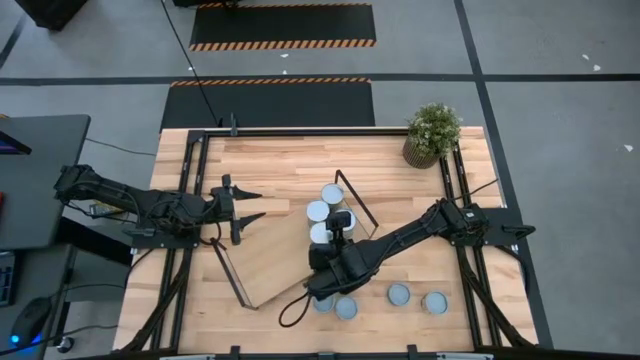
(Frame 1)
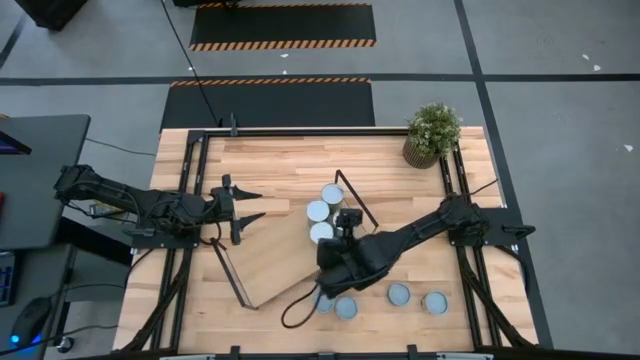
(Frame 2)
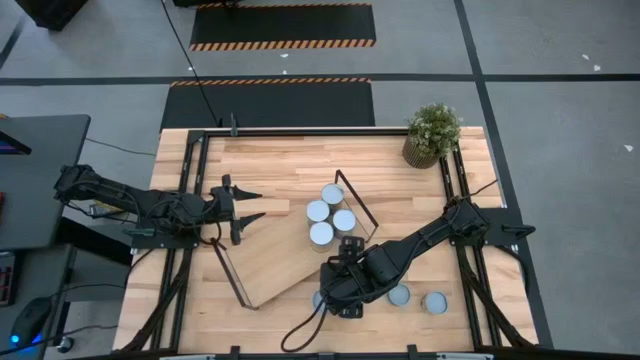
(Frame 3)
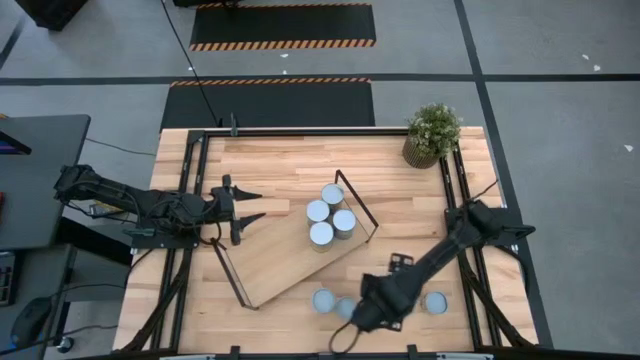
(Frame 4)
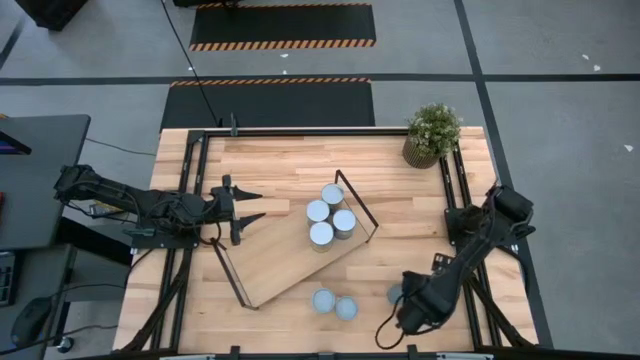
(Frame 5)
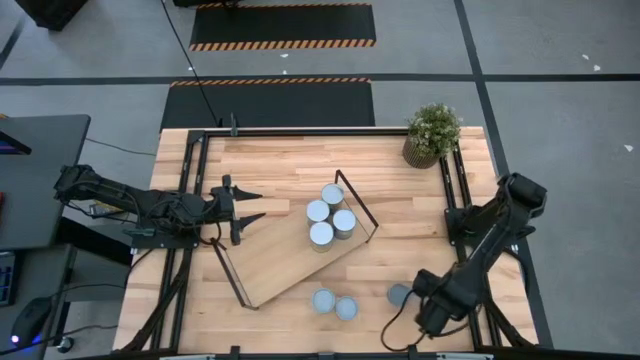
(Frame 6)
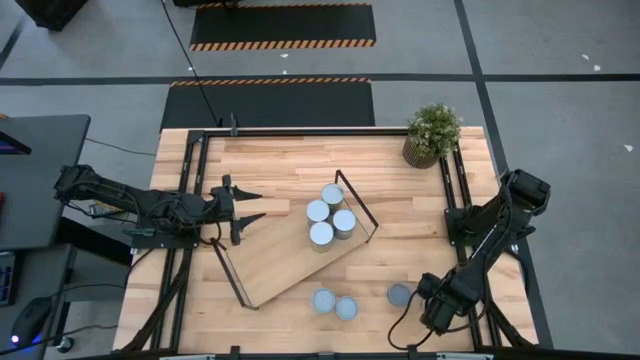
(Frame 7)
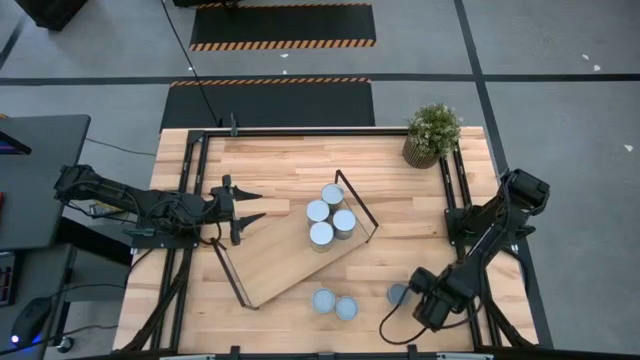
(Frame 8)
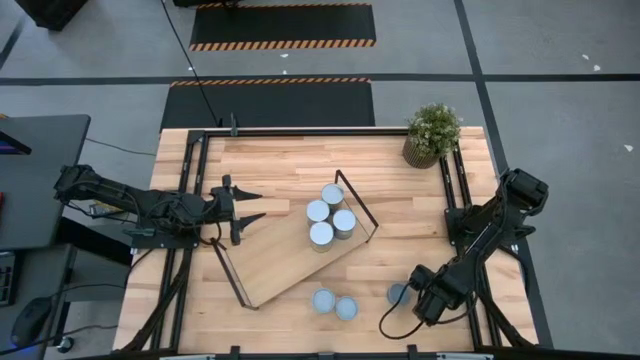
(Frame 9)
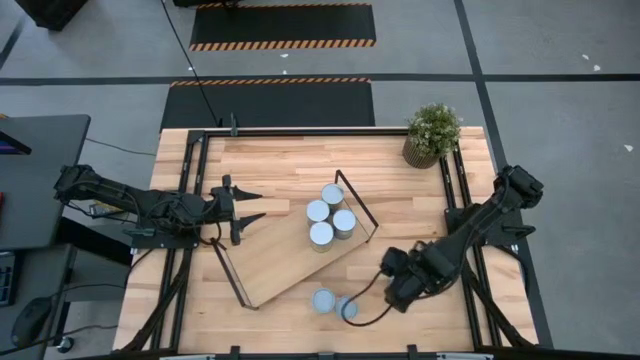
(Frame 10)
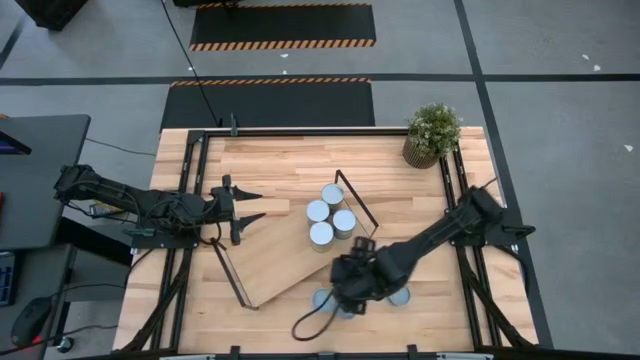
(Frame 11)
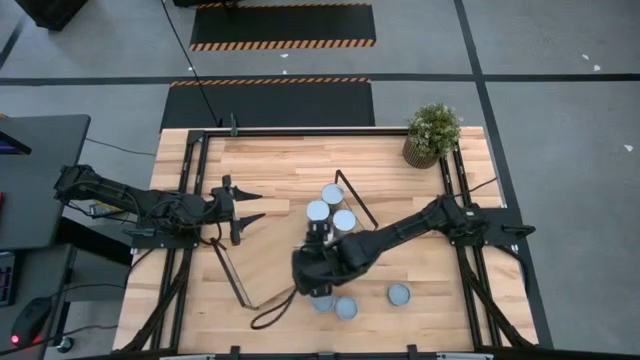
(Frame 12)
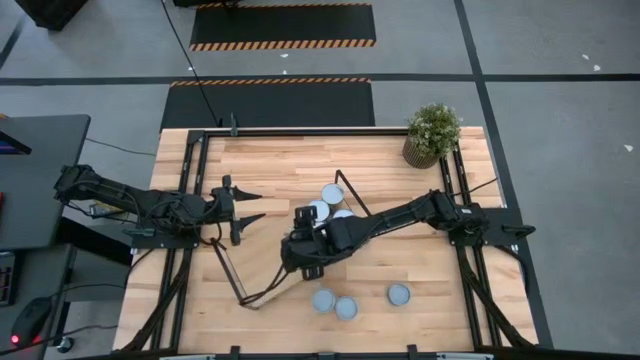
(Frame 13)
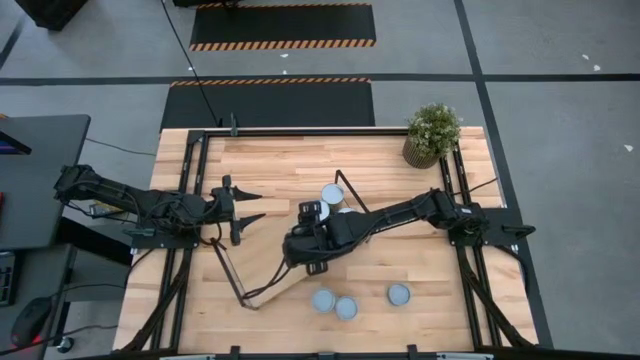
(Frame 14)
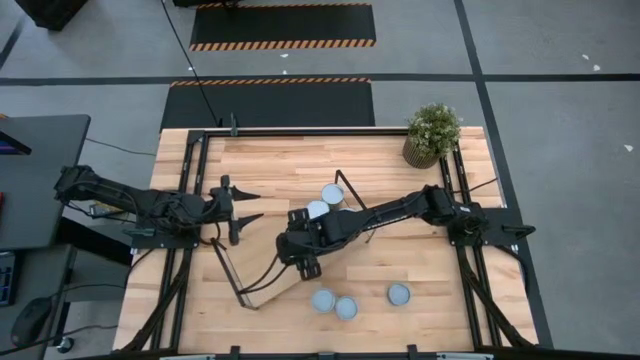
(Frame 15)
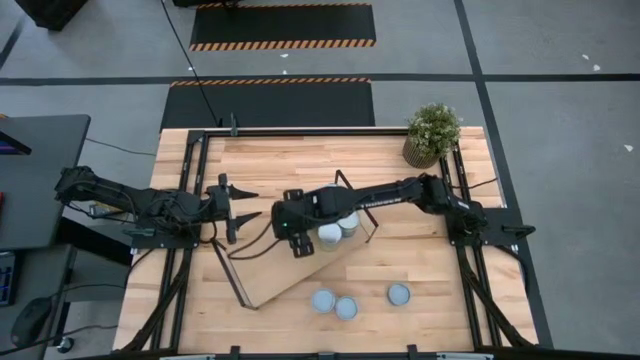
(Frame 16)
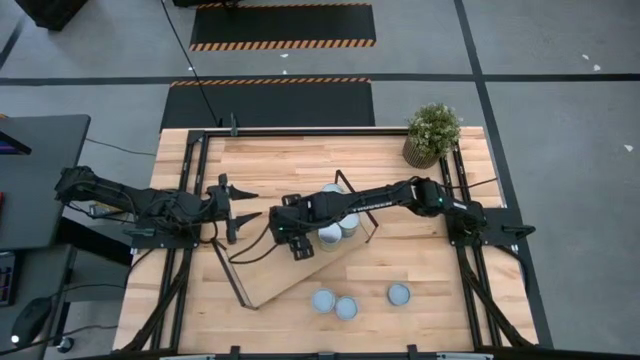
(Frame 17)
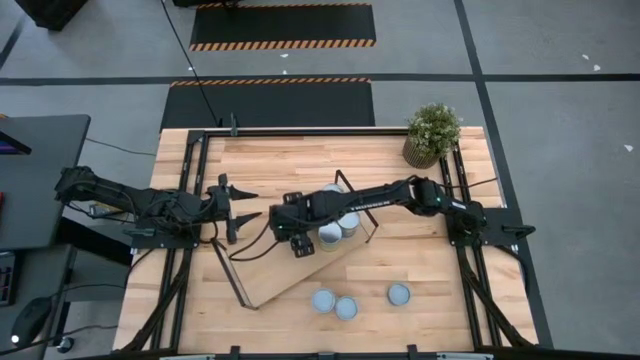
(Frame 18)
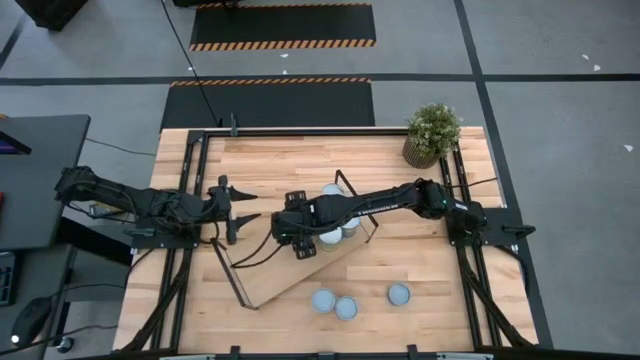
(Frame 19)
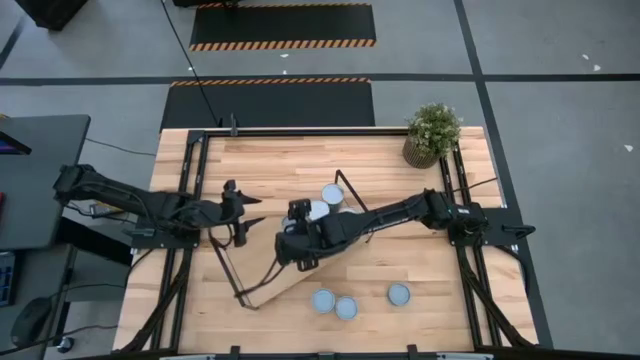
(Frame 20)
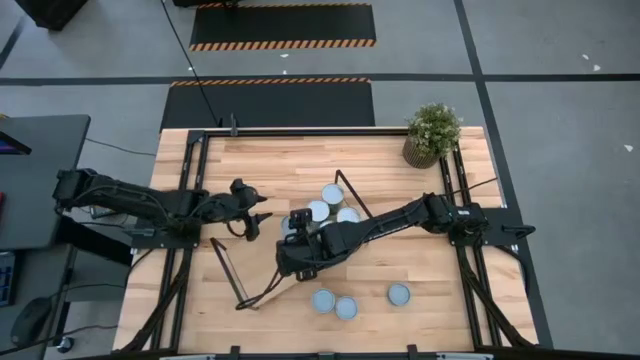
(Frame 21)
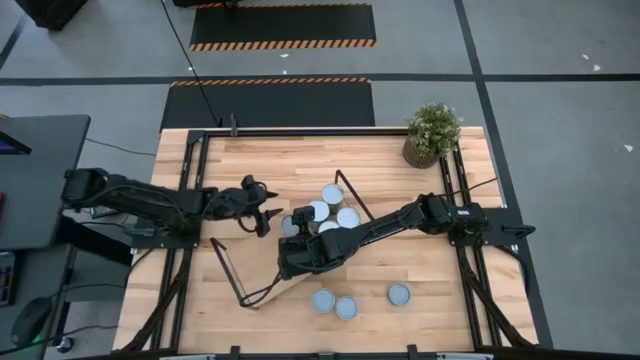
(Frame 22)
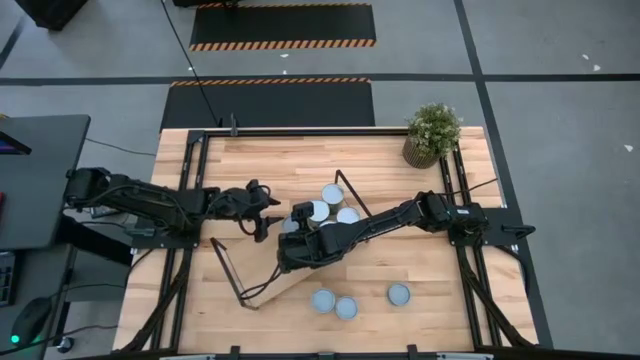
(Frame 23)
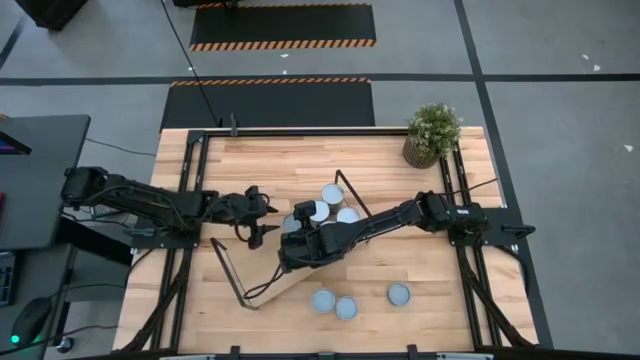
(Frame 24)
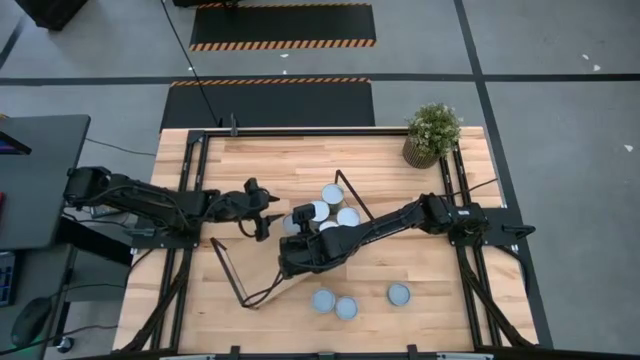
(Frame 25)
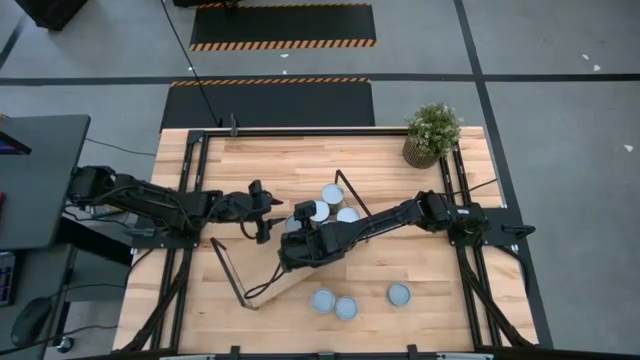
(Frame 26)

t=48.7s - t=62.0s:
Task: Pick and place cans onto a shelf
Put the right small can on the shelf

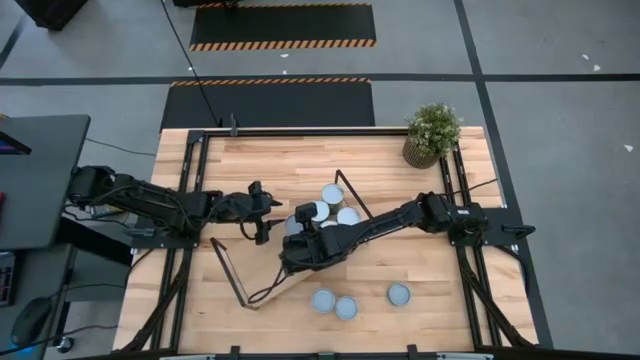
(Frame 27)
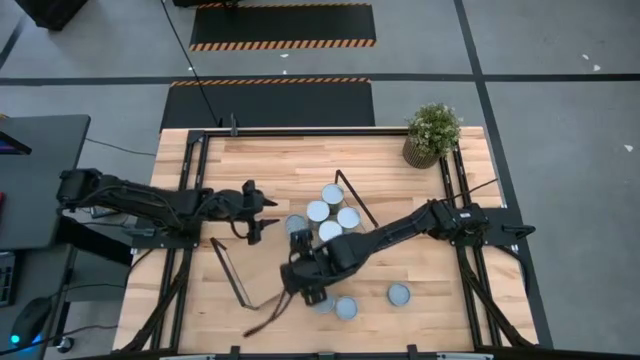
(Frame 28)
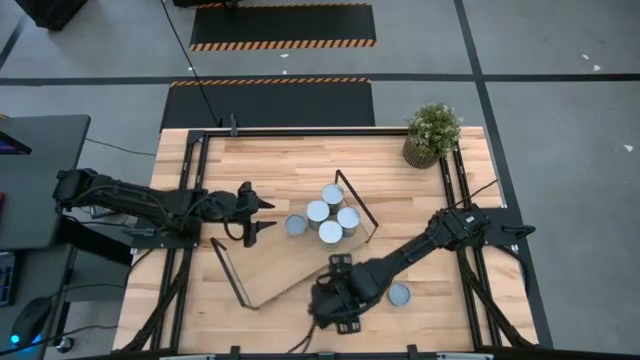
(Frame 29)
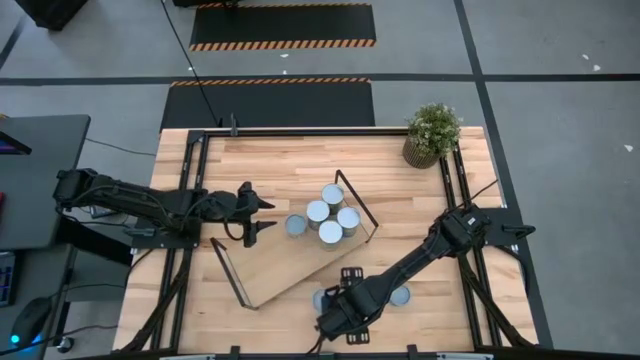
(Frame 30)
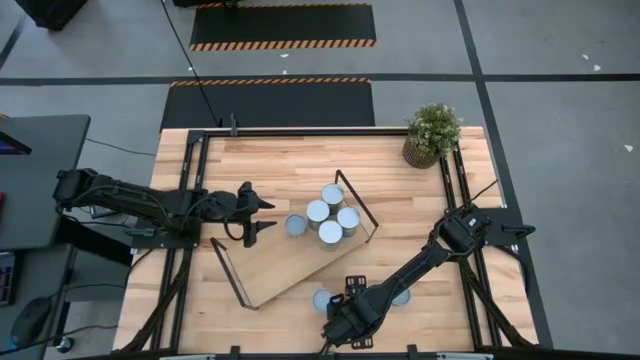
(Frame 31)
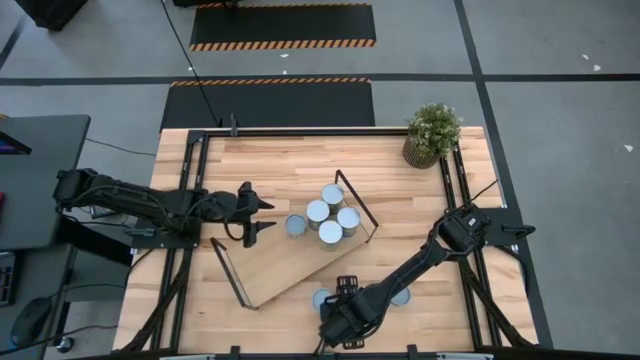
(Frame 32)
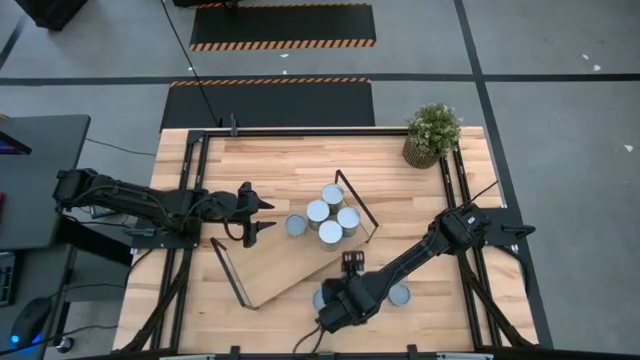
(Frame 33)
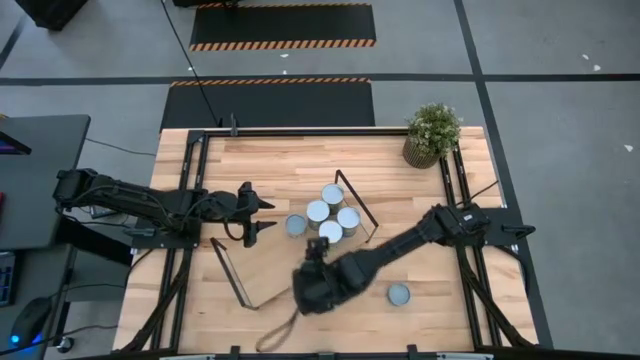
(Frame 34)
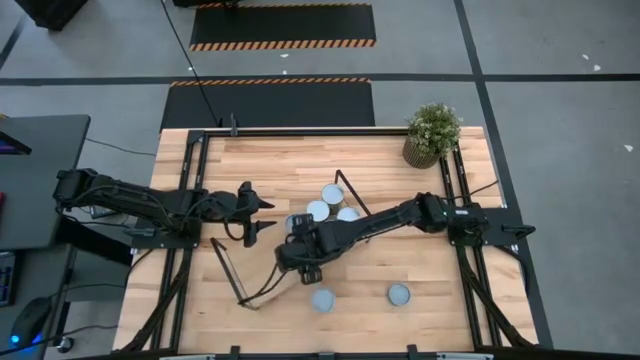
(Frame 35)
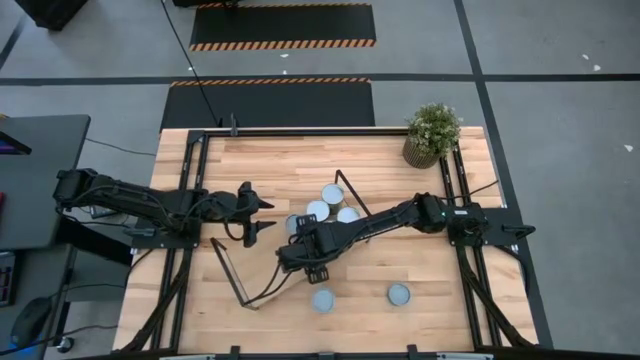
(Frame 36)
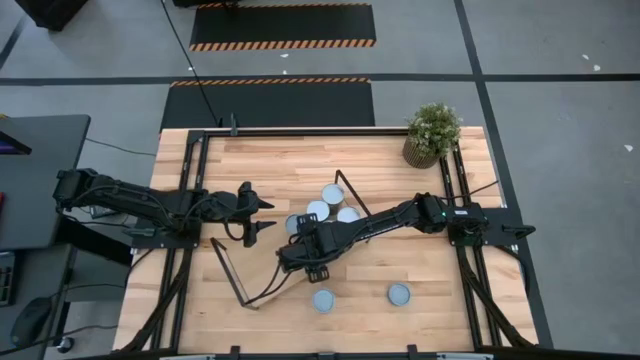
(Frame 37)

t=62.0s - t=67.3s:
Put the middle small can on the shelf

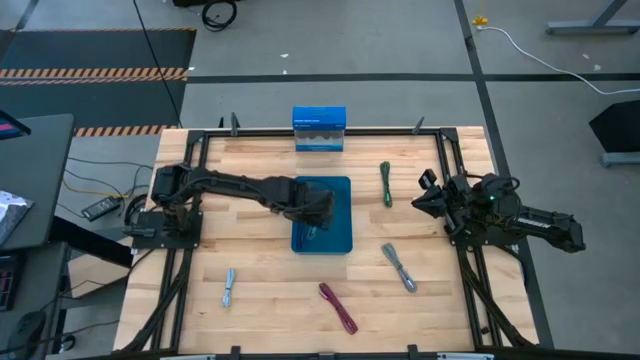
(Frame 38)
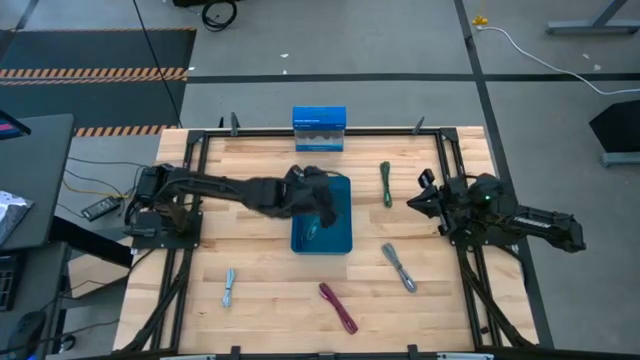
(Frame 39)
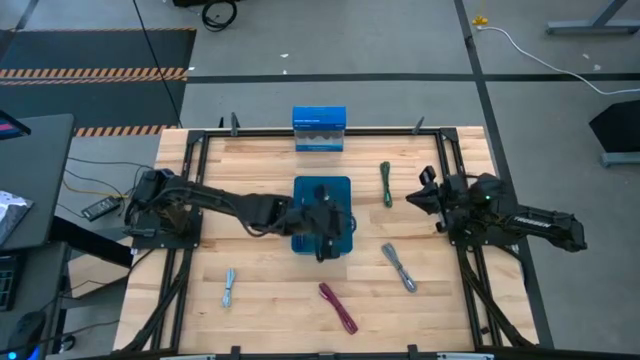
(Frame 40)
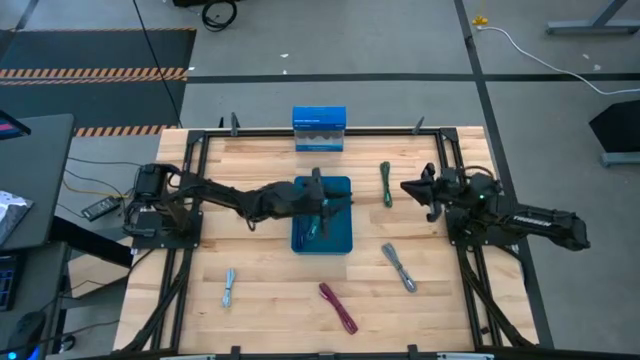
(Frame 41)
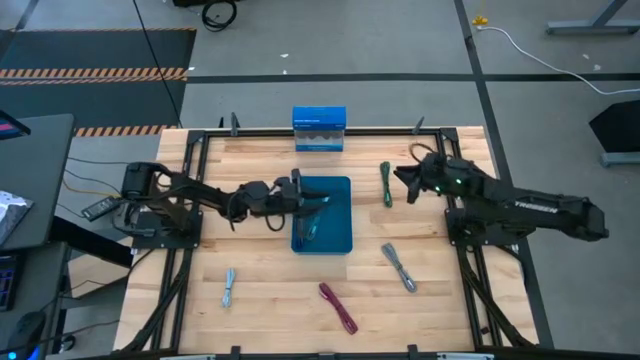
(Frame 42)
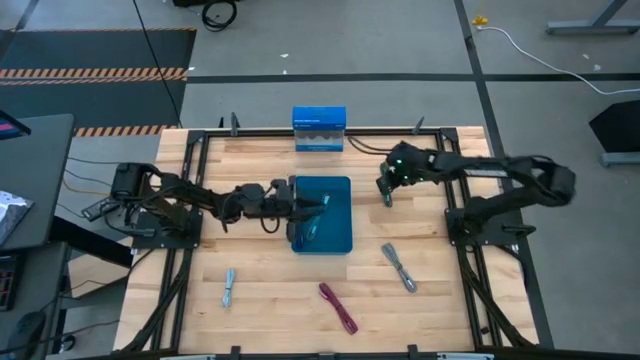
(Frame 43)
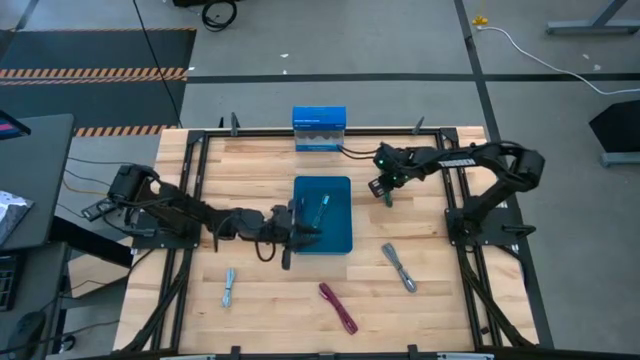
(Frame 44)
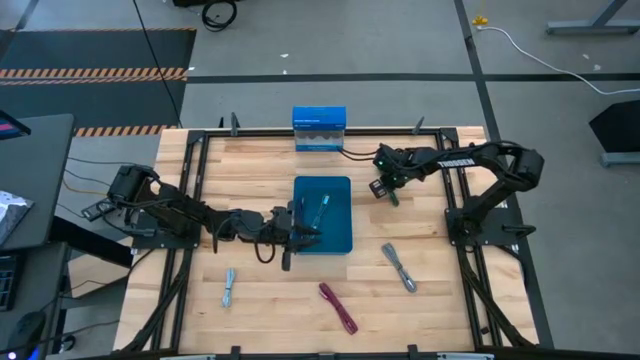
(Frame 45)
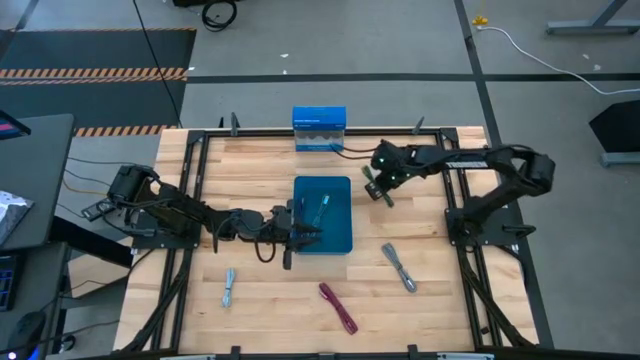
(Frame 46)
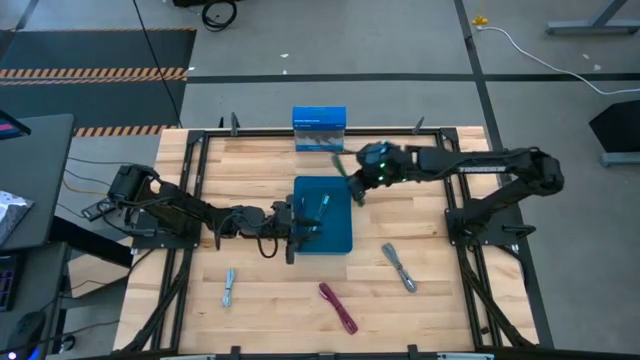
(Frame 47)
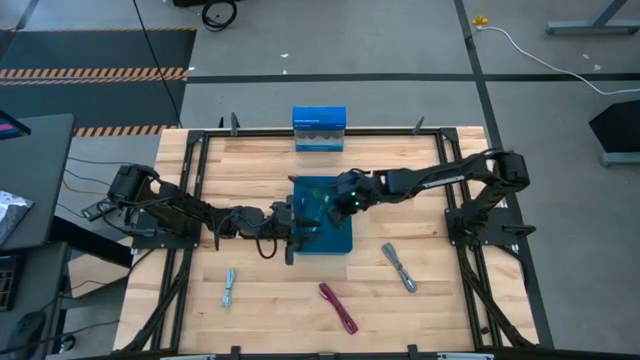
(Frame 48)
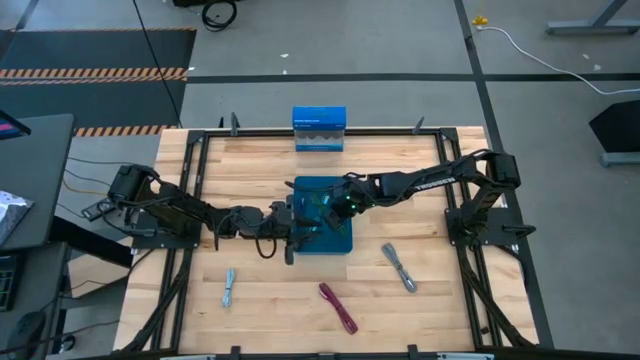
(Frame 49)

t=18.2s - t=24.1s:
Task: Pick and place USB-C Cables
Put the green charger cable into the blue bin
